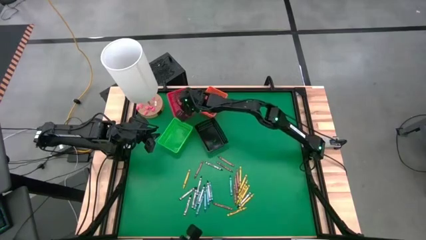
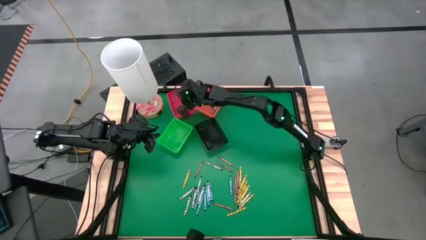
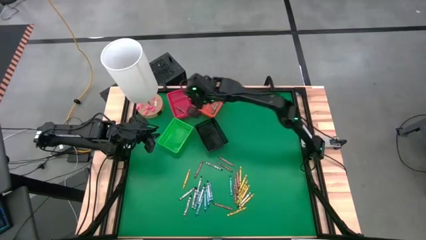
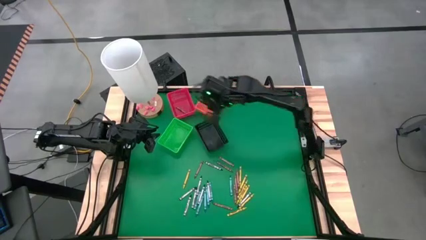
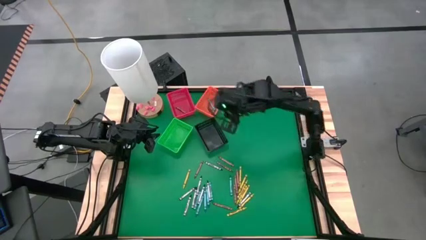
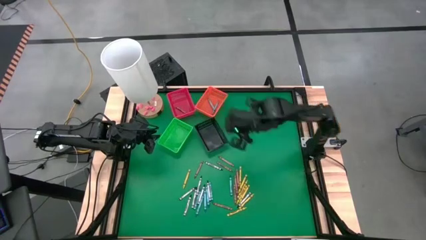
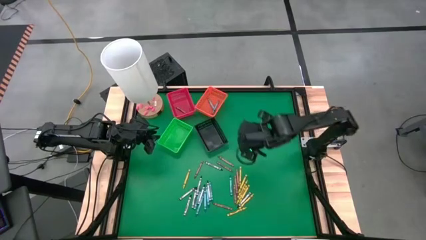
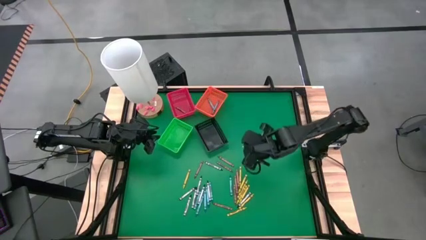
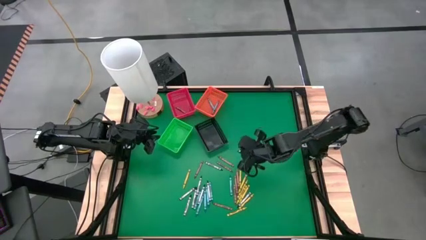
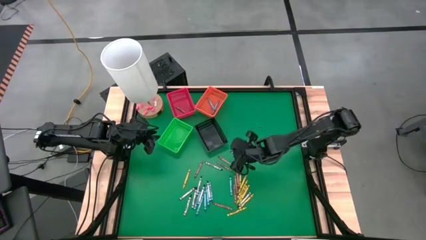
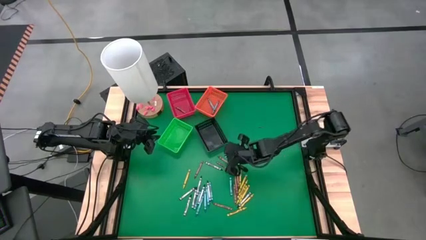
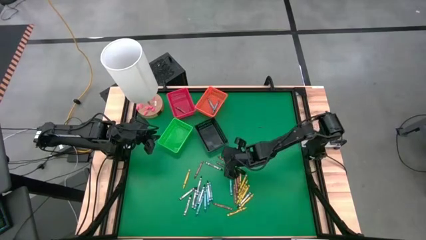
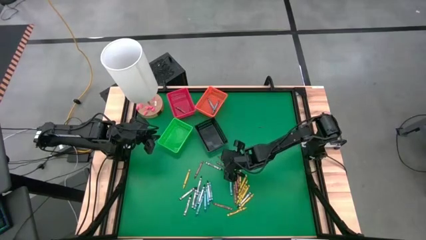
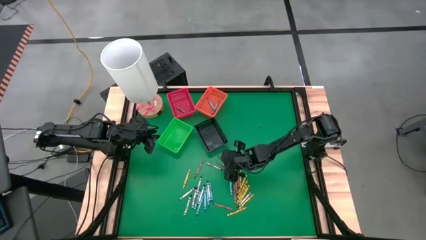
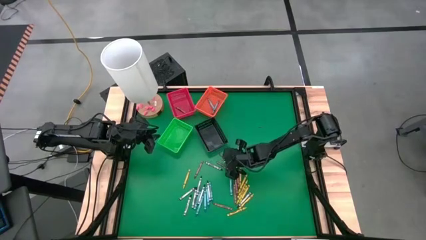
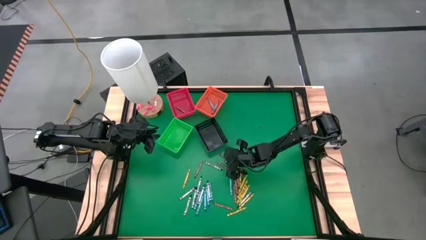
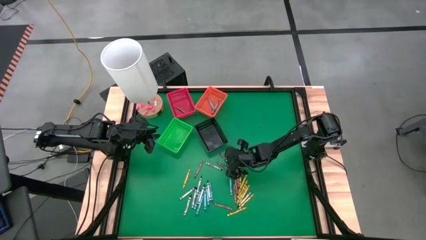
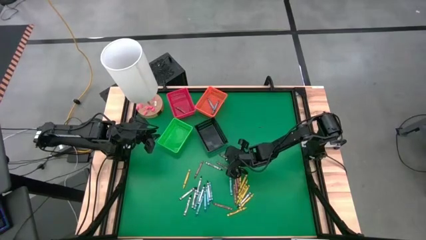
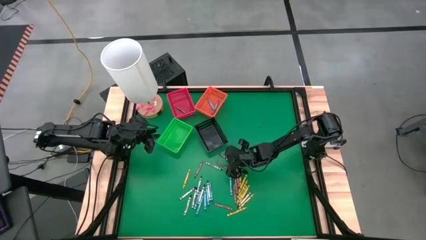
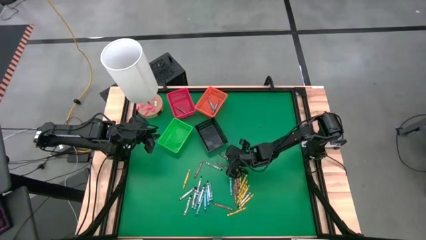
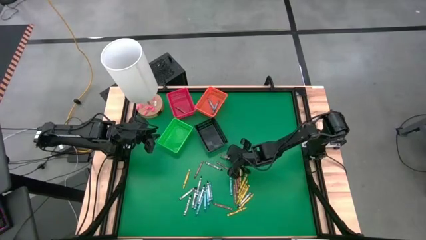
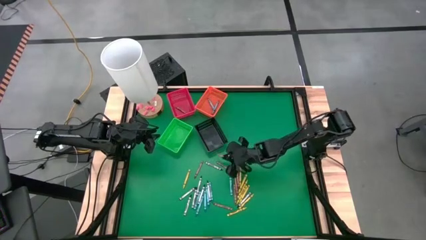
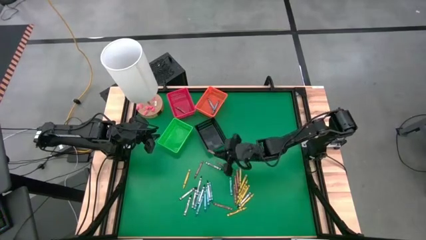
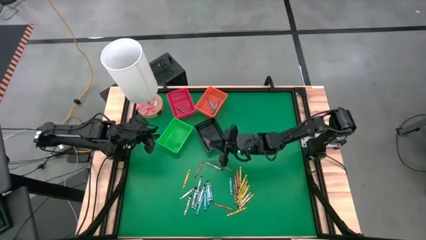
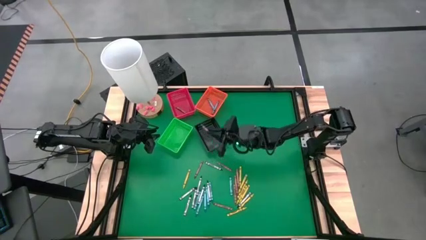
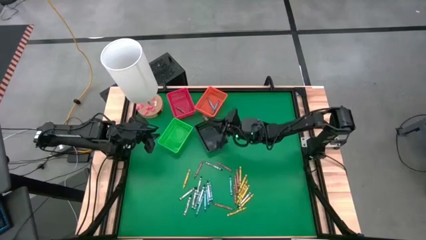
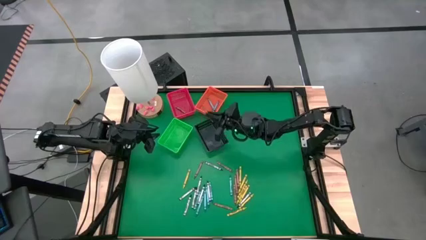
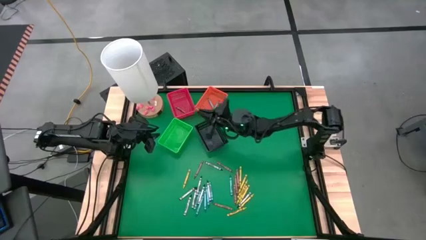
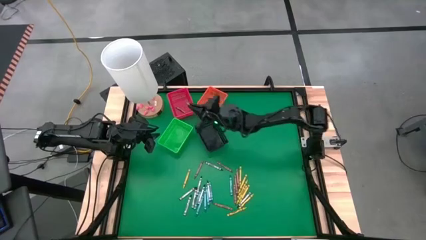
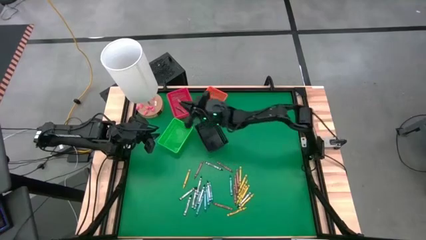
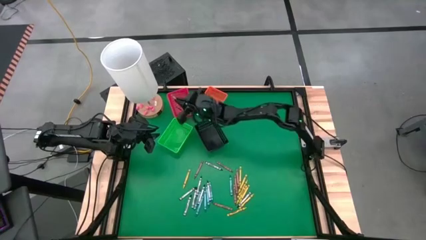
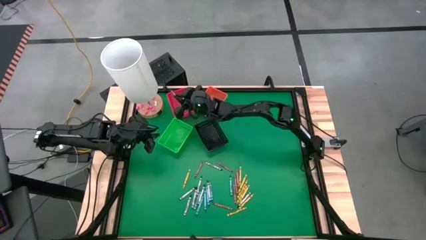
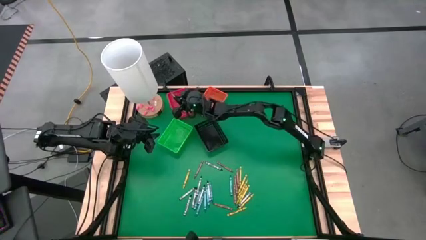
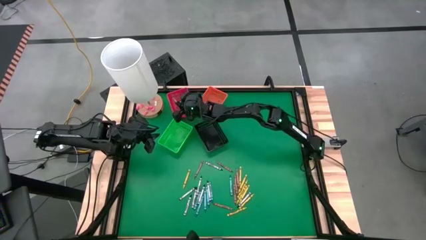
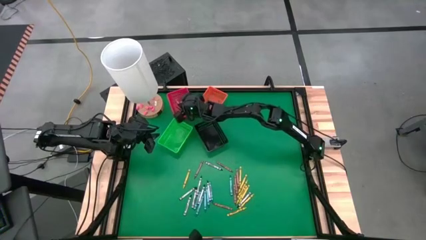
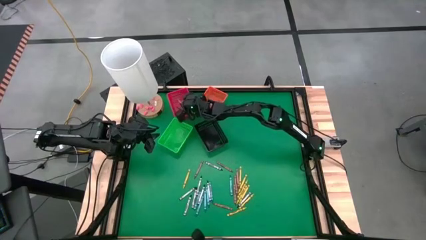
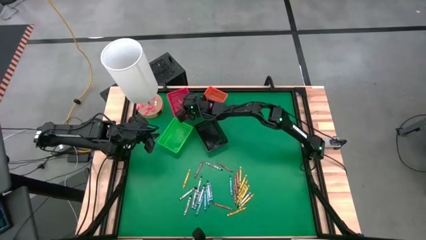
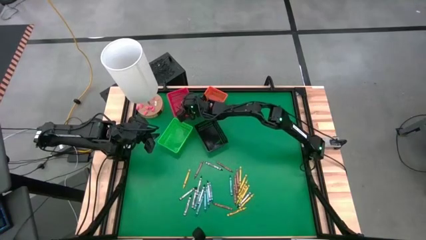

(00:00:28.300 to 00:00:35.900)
Task: Sort crayons
Put the brown crayon into the red bin

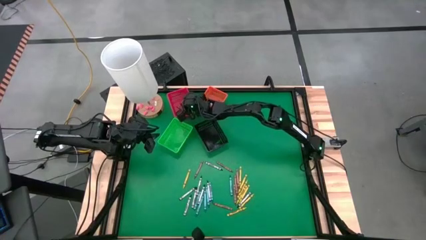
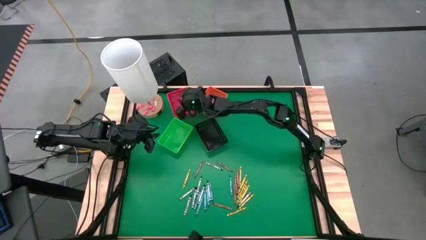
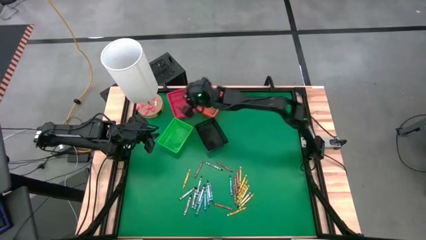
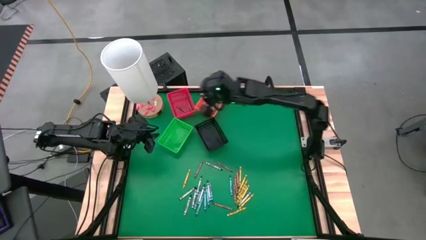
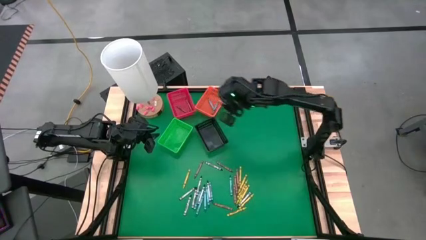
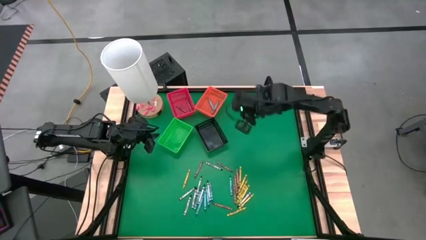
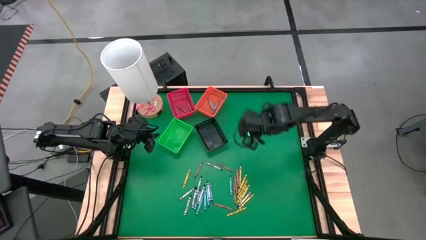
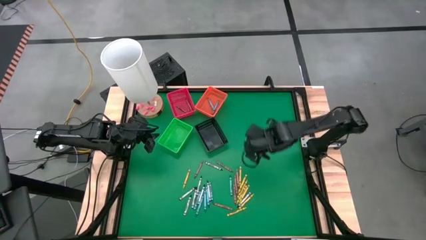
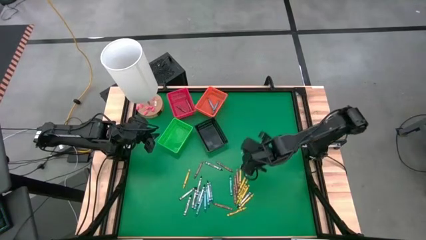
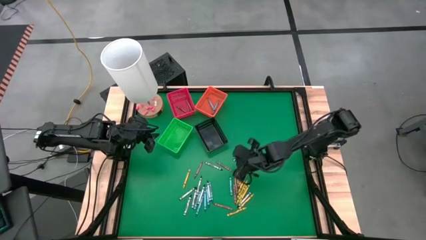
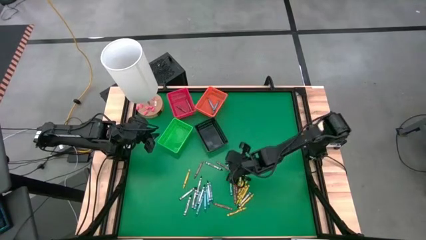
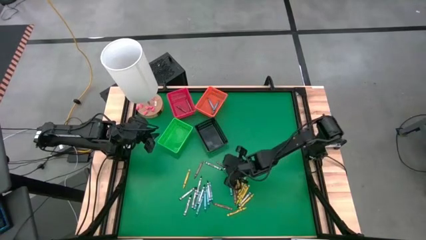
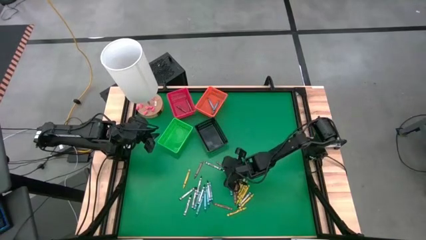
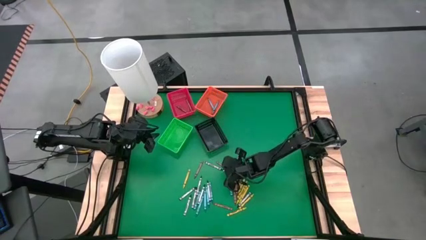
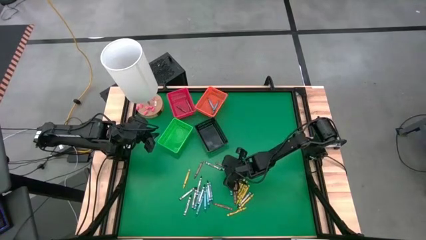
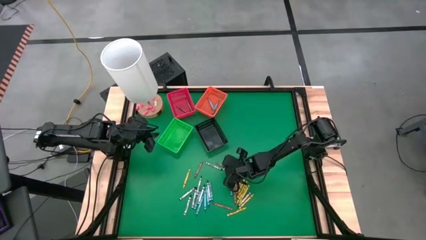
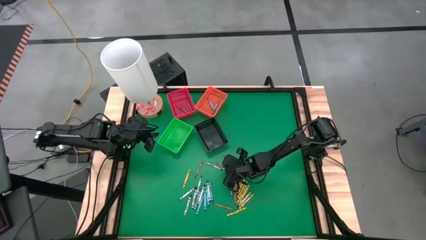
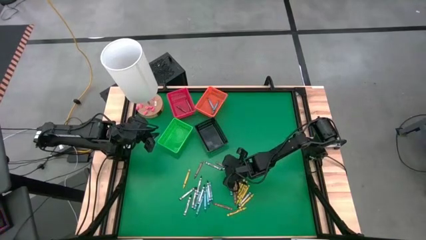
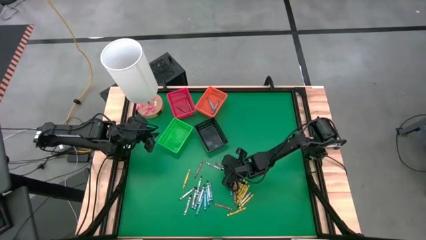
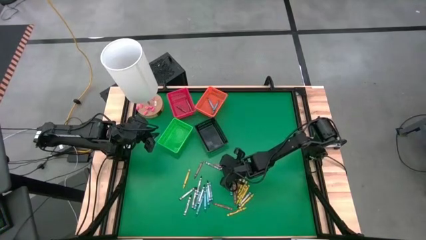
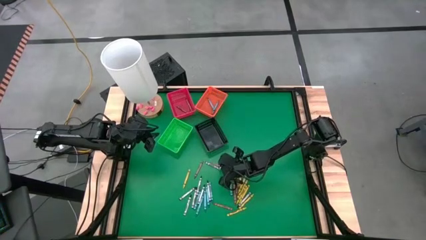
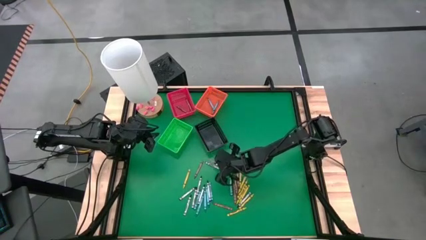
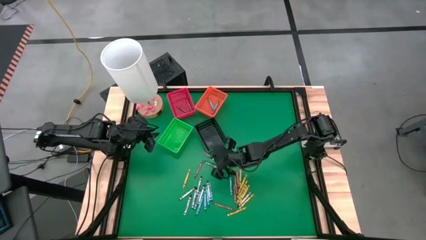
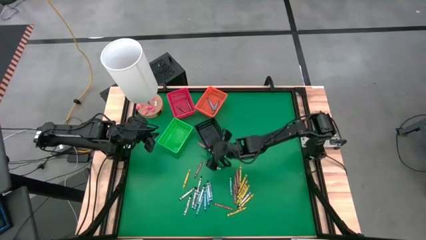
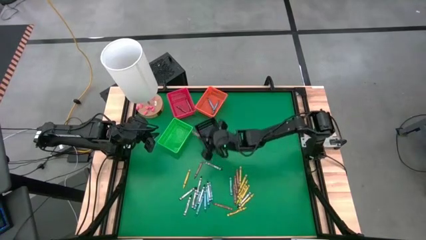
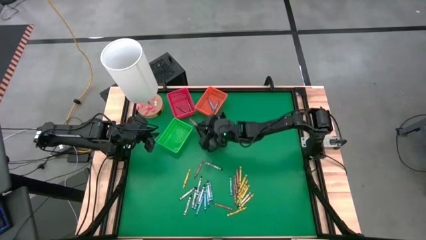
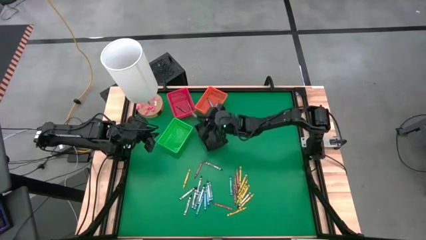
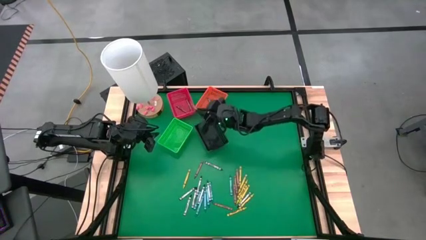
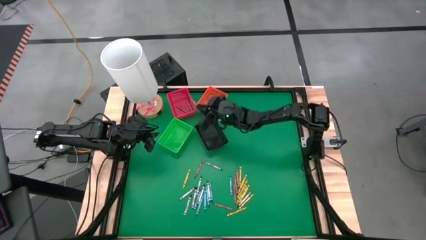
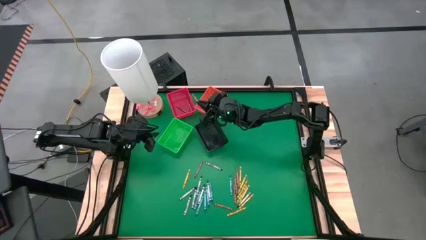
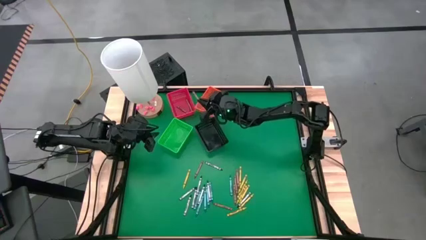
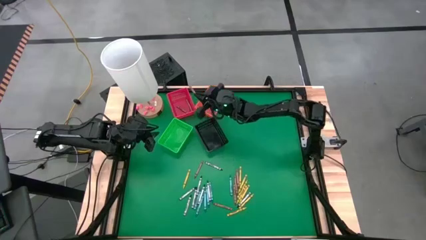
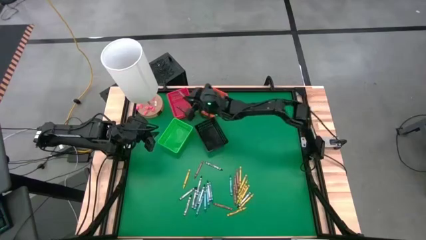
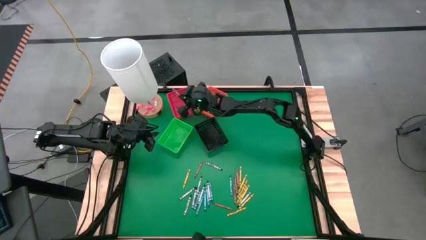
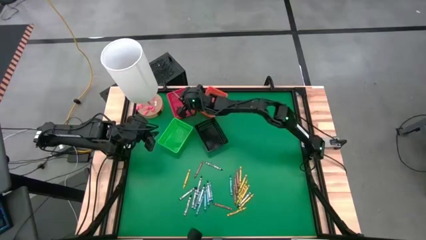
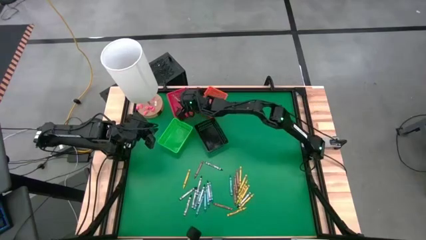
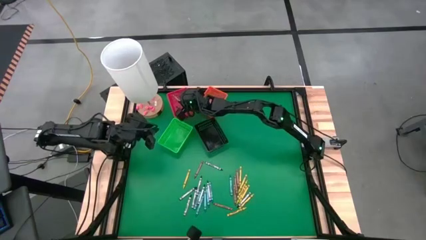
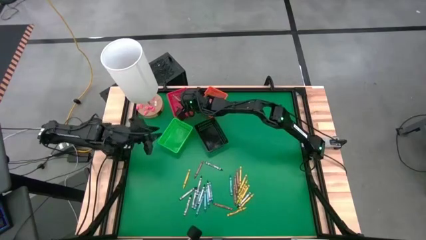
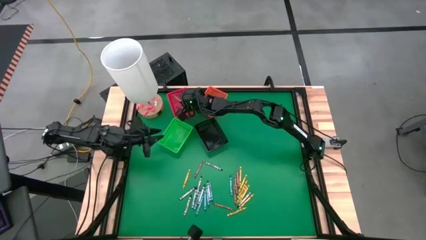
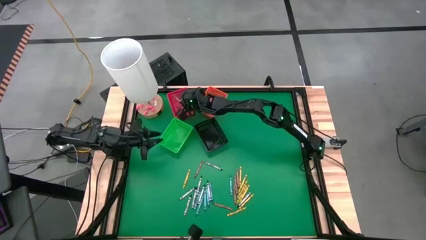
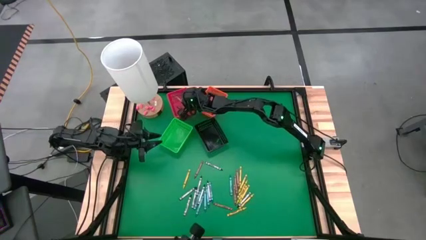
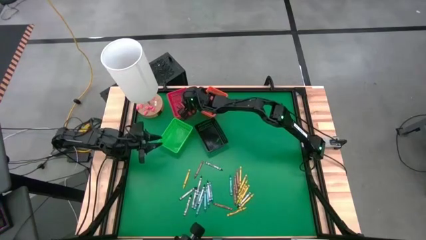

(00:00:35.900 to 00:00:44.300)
Put the brown crayon into the red bin
